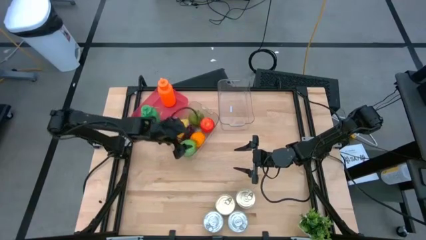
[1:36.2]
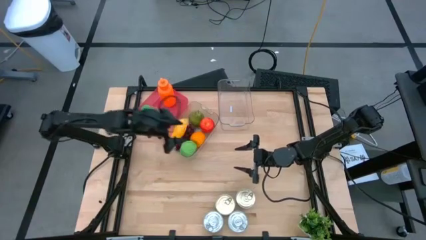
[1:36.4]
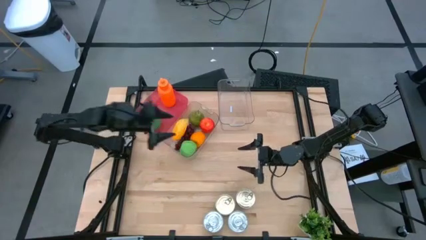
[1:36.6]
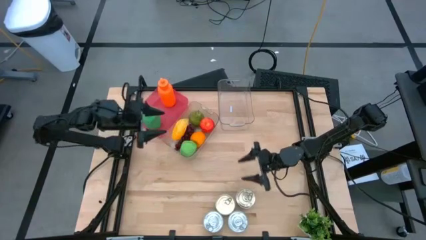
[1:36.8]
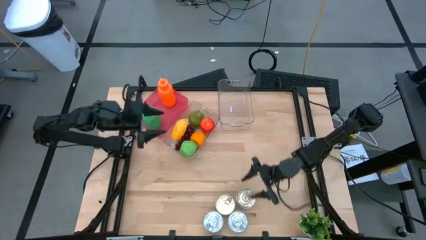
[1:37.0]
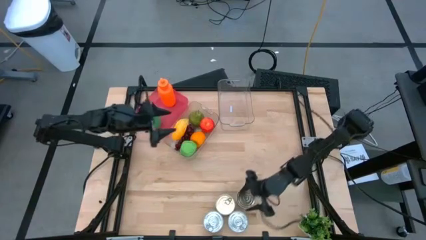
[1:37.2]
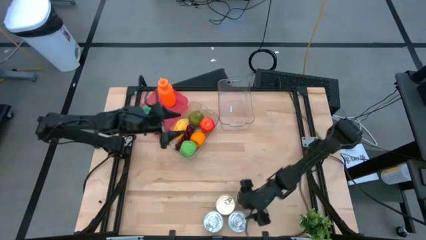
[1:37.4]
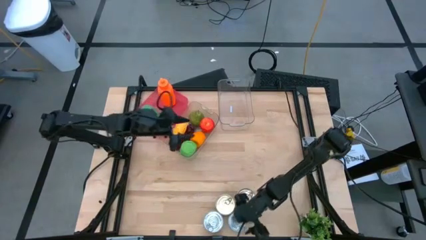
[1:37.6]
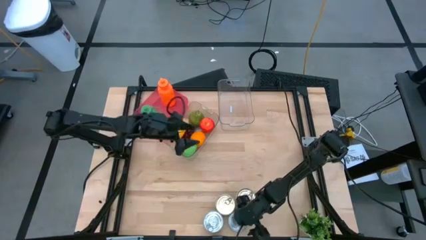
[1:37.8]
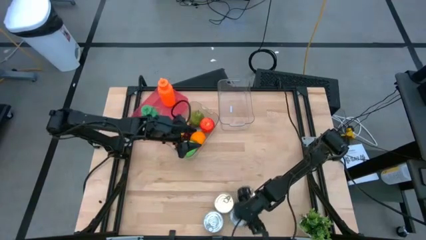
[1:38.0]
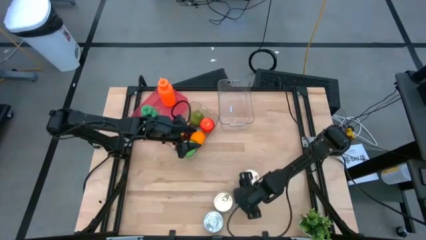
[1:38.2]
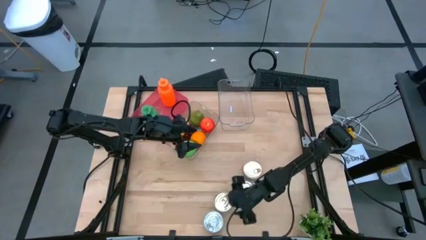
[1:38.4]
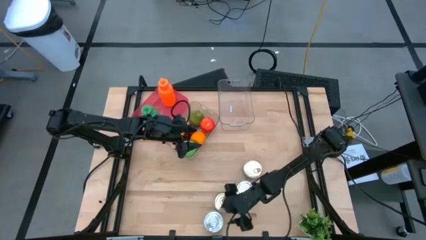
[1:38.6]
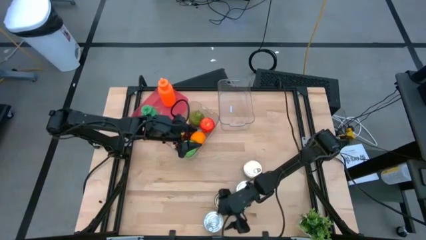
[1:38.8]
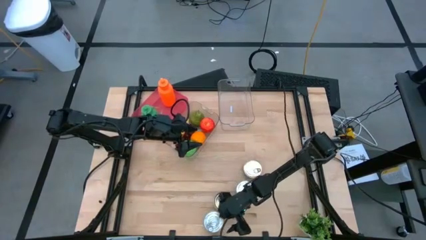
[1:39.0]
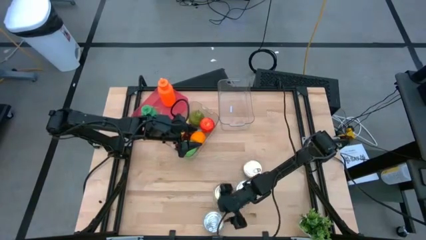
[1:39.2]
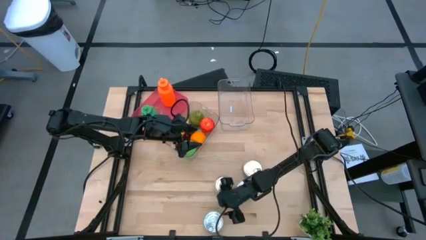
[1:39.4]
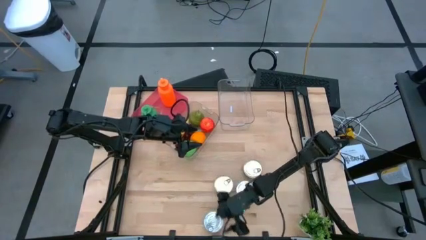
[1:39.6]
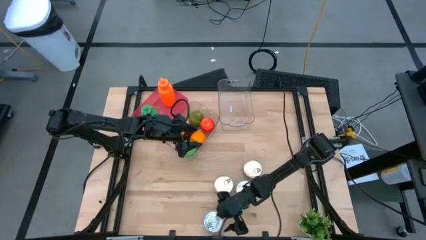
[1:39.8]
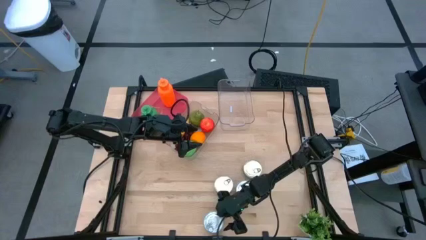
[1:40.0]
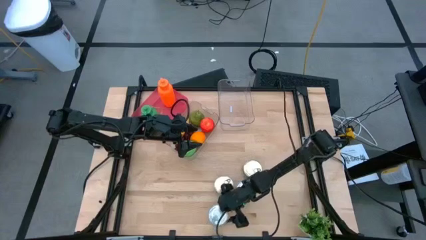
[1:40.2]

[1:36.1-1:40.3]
Task: Pick & Place Food Item
Adjust the tuna cans

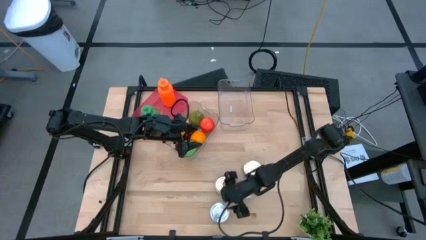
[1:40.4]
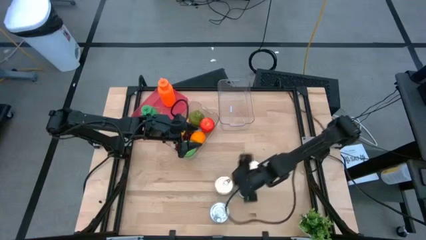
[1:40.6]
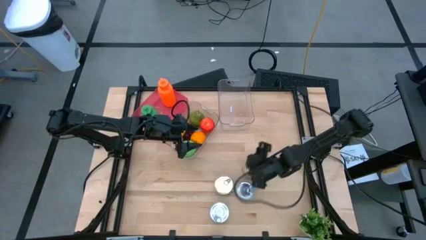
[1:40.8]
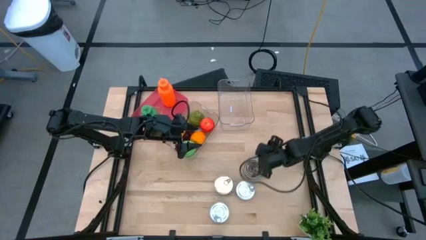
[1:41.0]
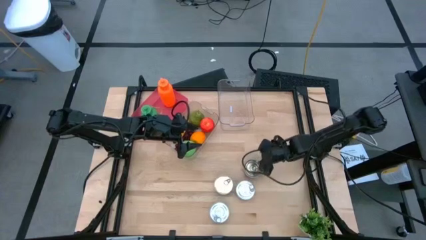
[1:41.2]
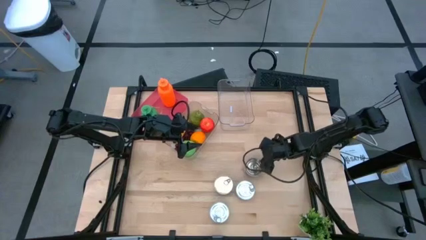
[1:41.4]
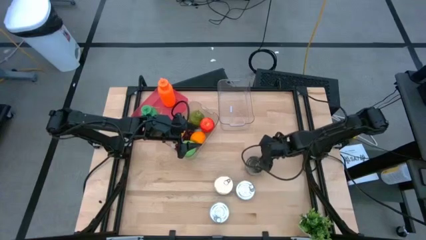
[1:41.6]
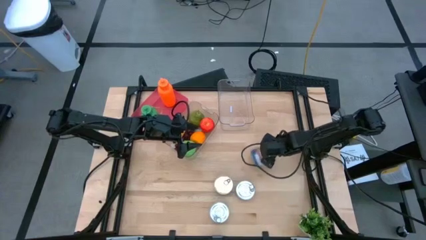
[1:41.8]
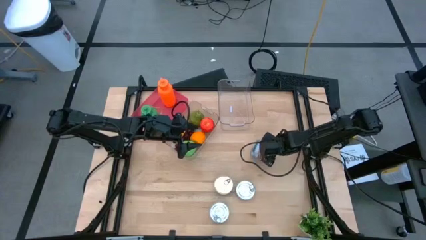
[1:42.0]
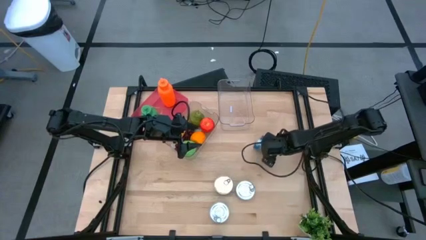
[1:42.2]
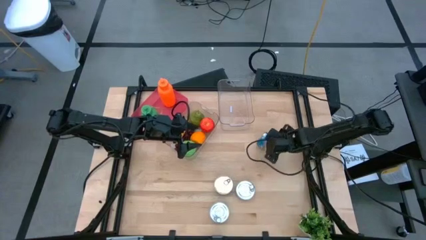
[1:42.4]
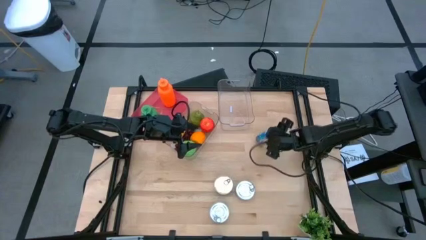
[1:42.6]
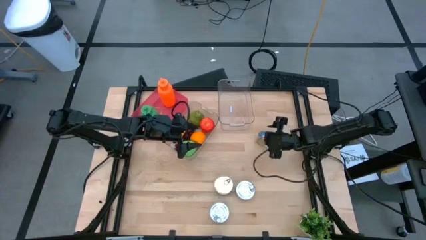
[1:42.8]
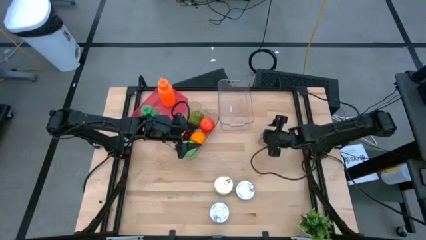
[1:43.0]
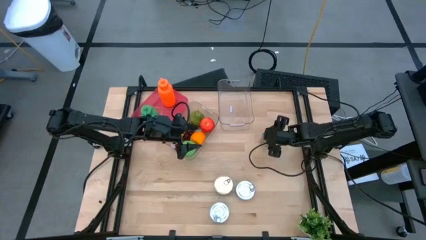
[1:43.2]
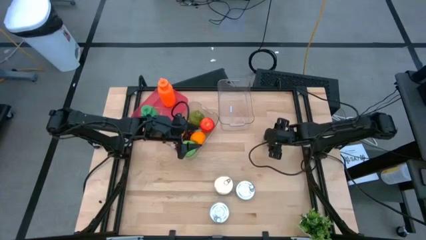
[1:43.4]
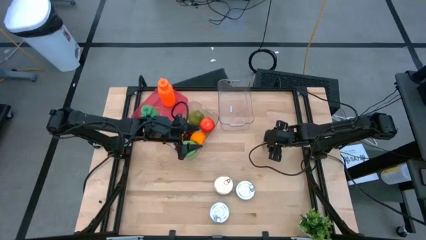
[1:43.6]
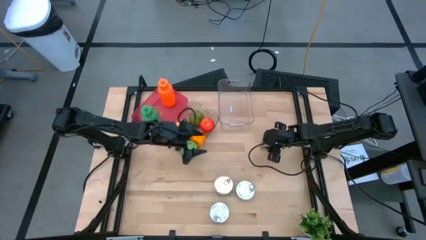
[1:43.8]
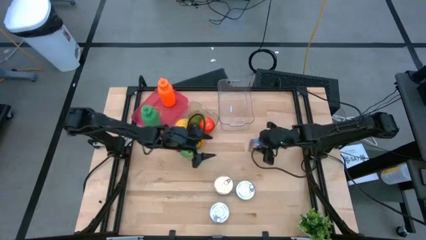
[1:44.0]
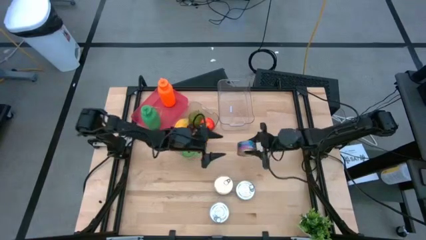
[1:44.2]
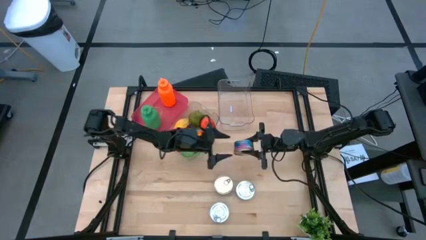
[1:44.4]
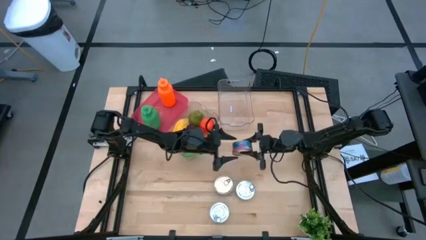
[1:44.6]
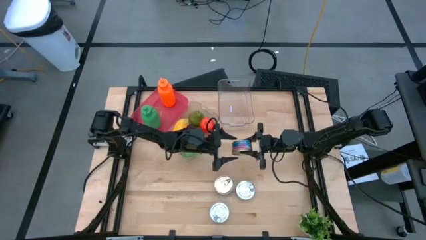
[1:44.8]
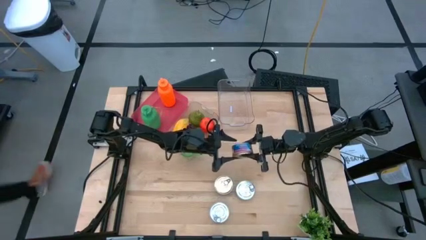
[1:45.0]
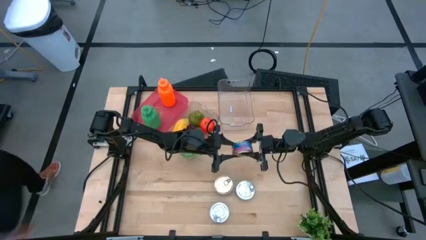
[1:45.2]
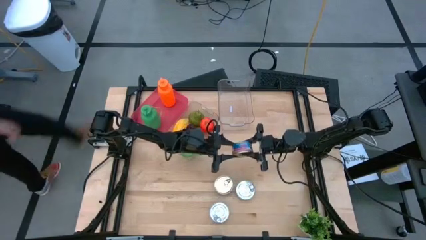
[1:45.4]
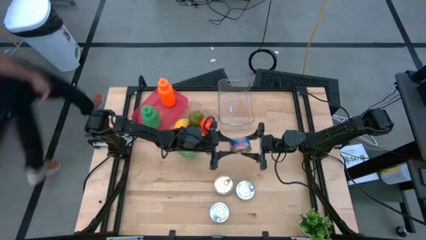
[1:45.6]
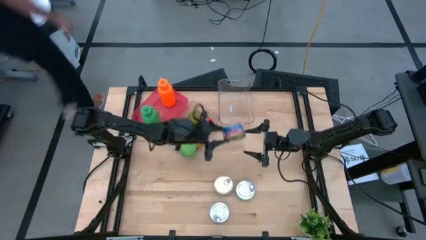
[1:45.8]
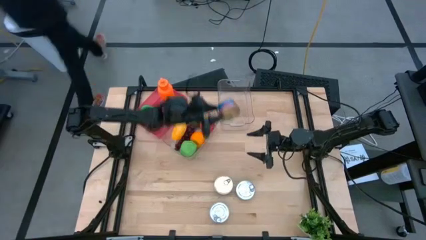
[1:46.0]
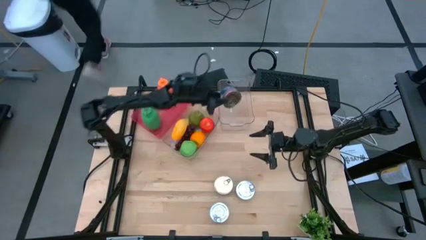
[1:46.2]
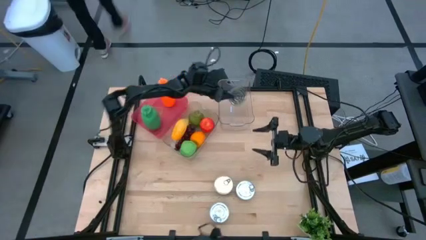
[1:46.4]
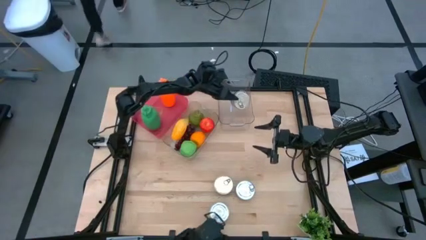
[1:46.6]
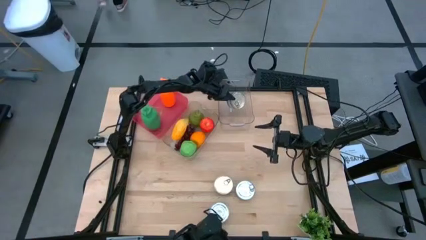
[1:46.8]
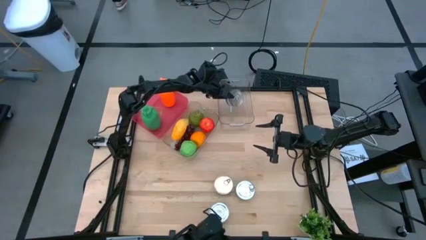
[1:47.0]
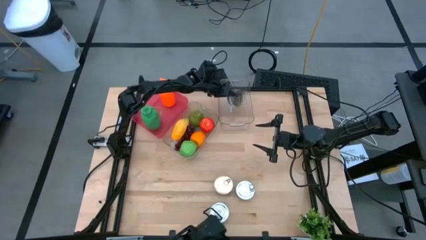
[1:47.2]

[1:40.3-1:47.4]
Put the top blue pink tuna can into the right transparent bin

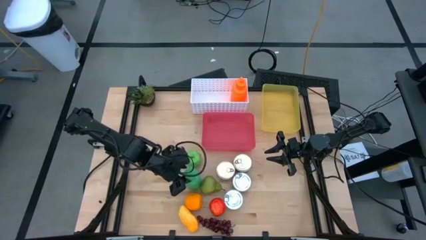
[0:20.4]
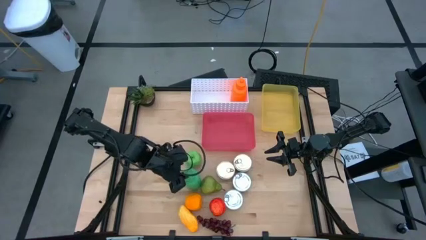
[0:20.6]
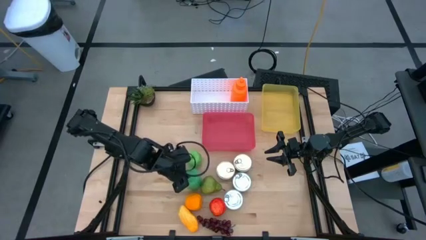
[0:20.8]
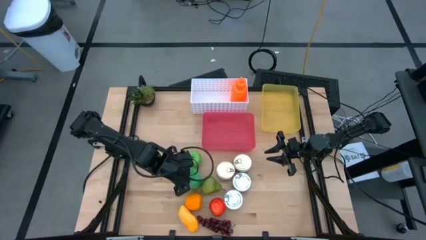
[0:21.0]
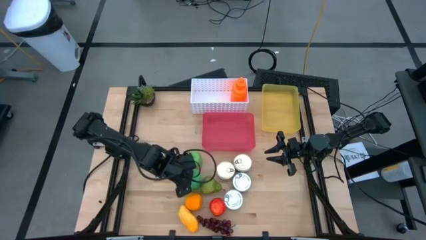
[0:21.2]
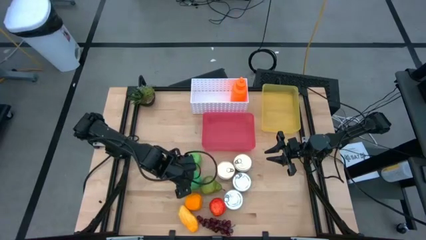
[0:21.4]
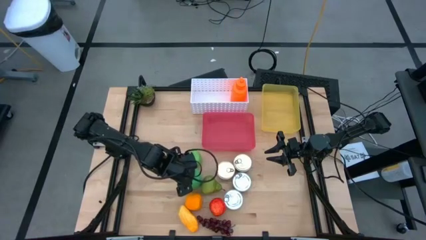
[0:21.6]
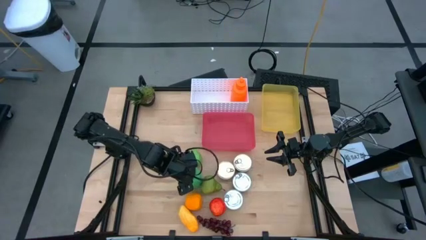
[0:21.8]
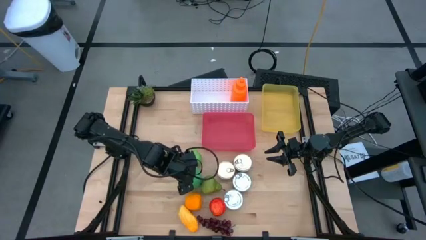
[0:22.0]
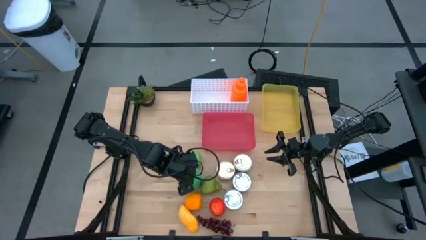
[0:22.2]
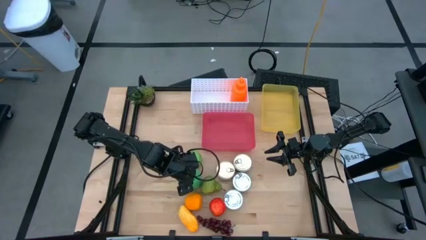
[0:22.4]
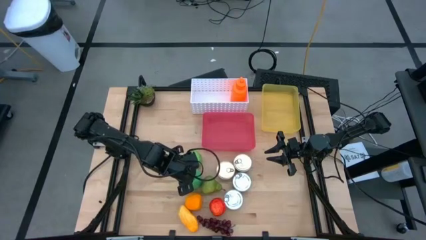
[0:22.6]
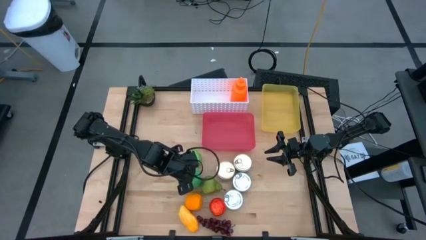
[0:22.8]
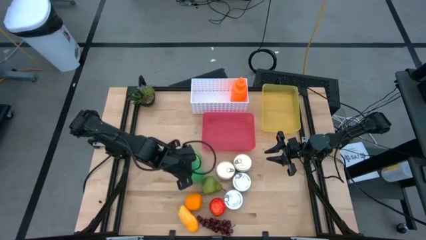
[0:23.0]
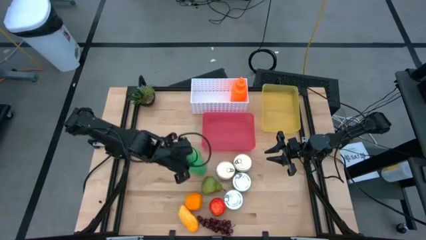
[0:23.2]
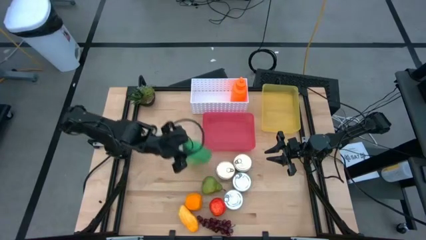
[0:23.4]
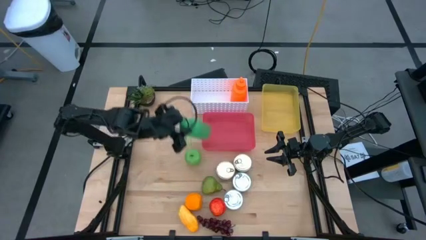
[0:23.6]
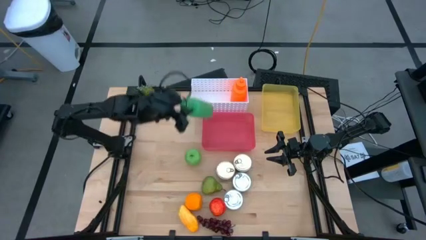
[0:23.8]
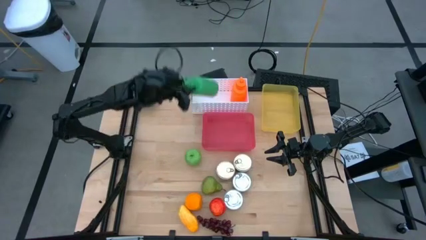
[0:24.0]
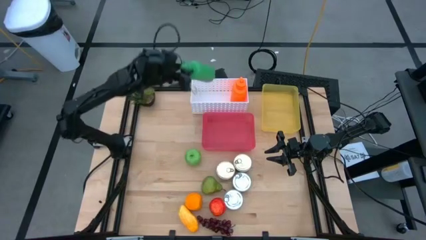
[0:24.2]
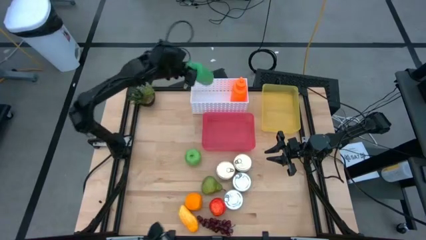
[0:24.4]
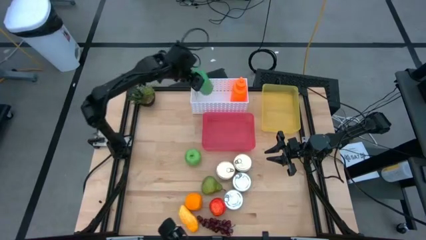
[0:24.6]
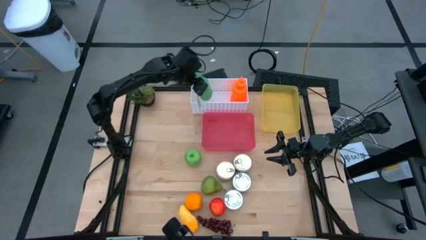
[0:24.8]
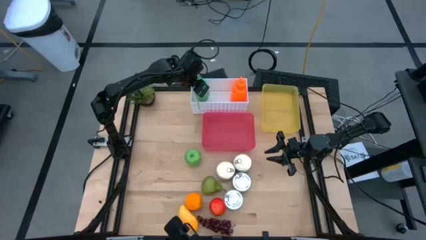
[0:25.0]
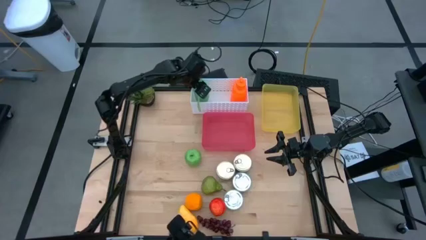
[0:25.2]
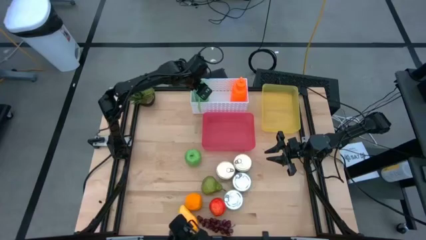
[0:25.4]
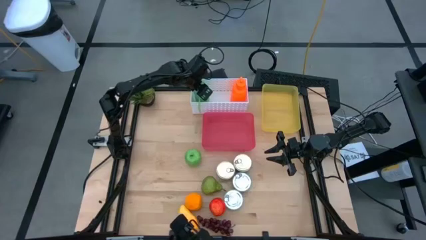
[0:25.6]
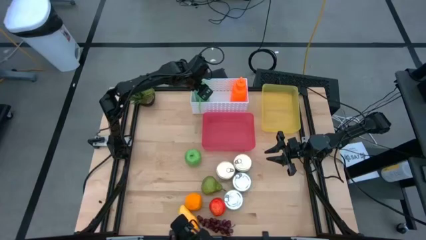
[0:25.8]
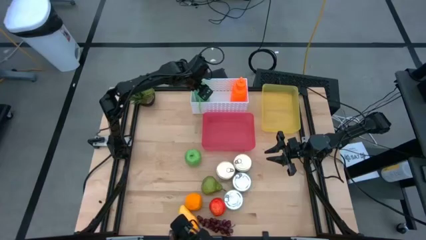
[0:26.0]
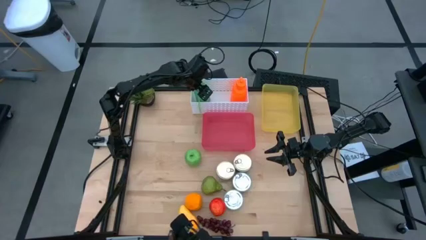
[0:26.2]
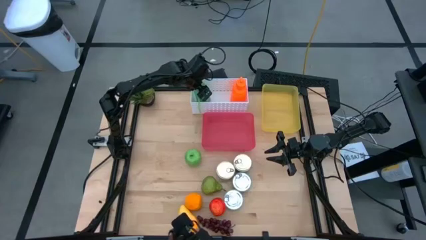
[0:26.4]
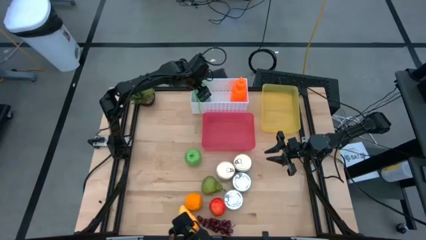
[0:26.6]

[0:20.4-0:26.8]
Task: Pick & Place Food Item
Put the green tumbler into the white bin
